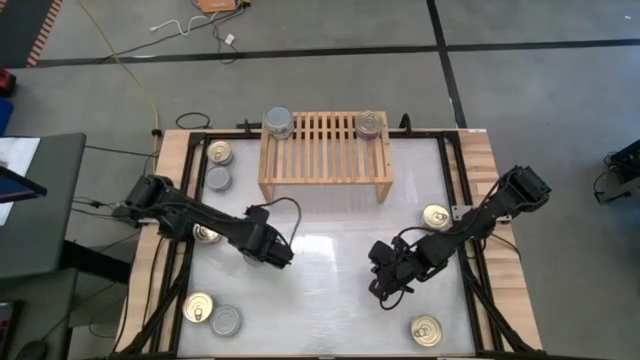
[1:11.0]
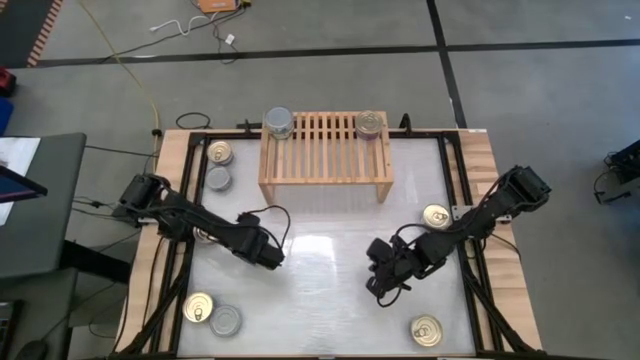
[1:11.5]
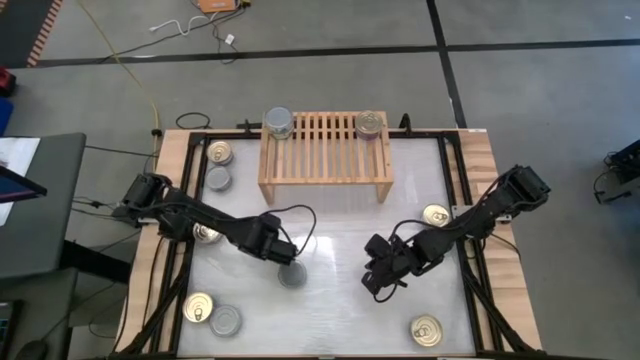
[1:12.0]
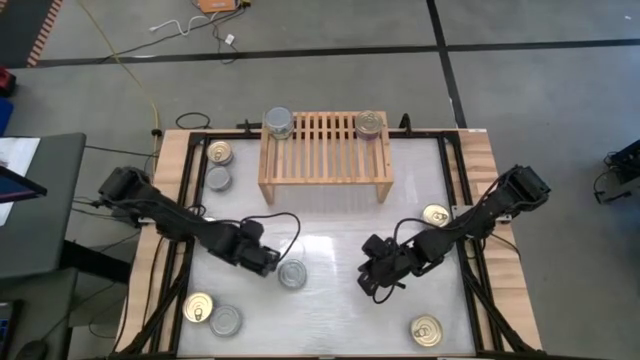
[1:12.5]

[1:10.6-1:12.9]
Task: Stack canned seafood by type on shelf
Move the green tuna can to the center of the table

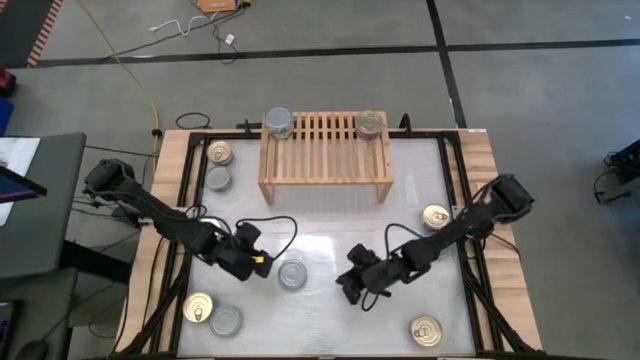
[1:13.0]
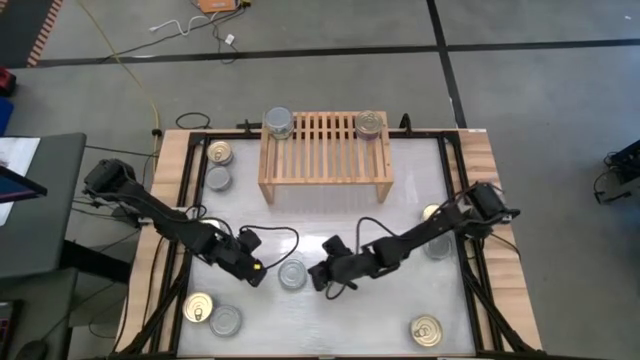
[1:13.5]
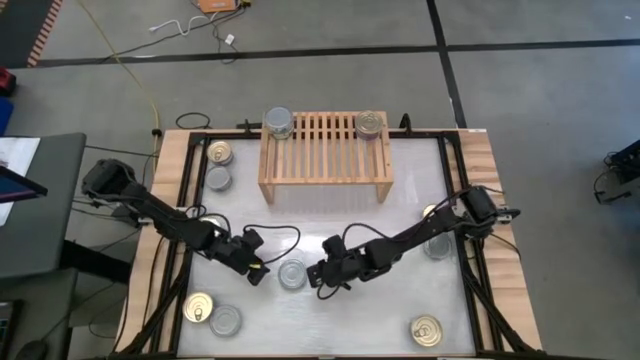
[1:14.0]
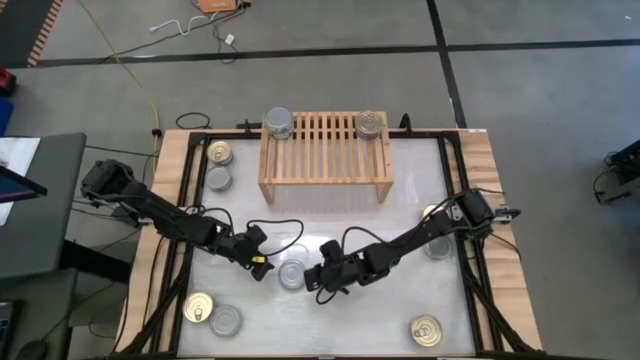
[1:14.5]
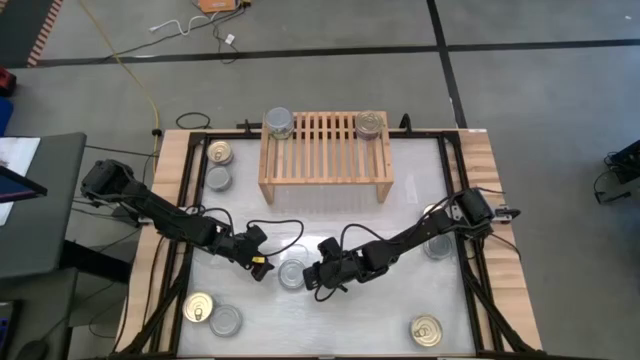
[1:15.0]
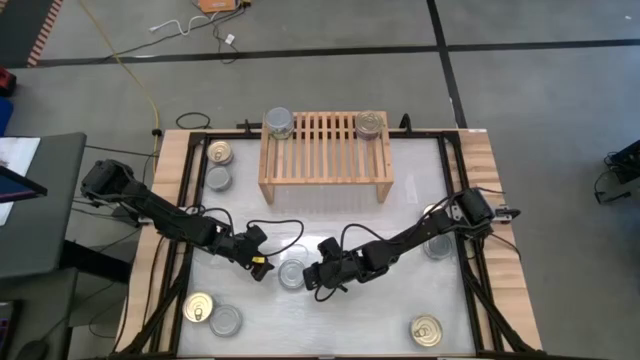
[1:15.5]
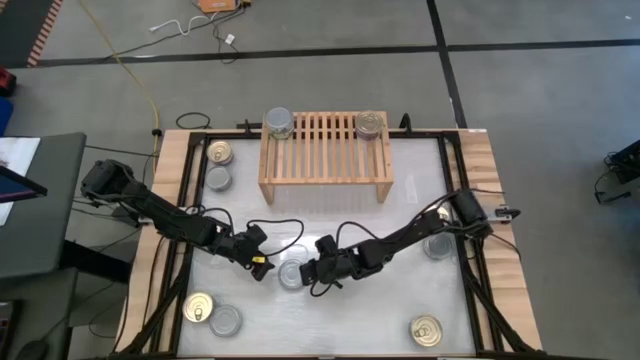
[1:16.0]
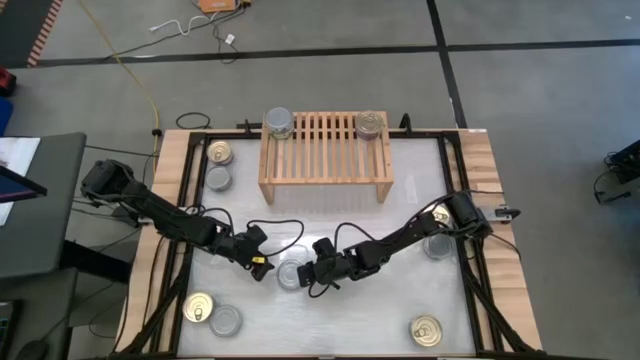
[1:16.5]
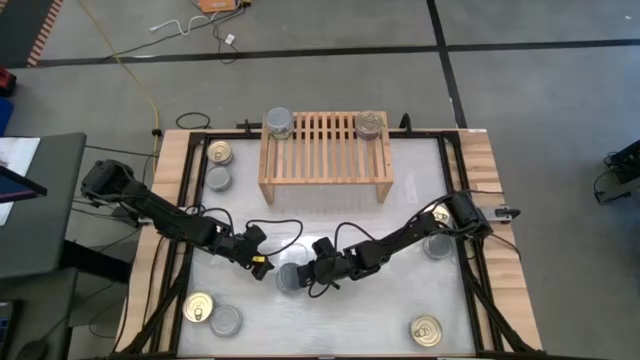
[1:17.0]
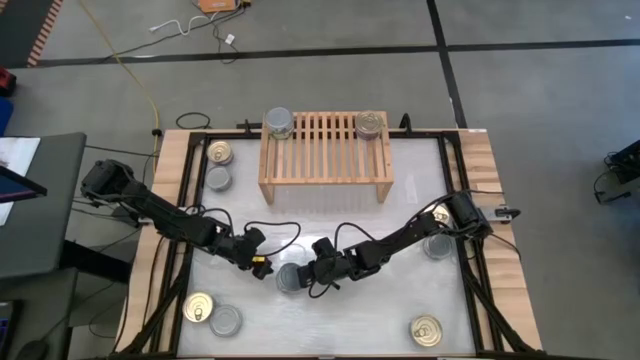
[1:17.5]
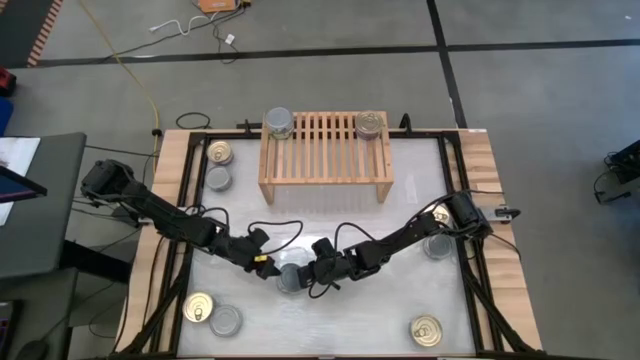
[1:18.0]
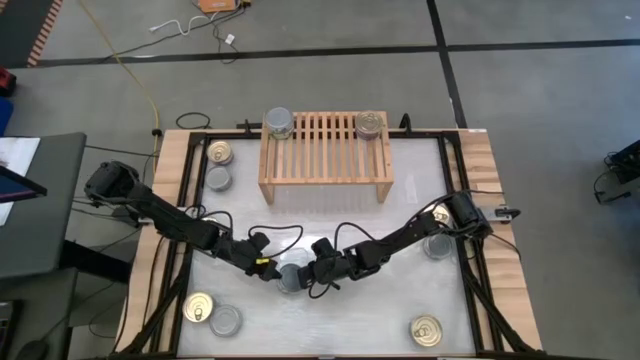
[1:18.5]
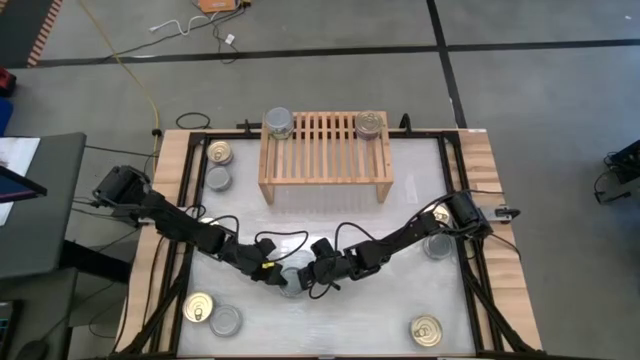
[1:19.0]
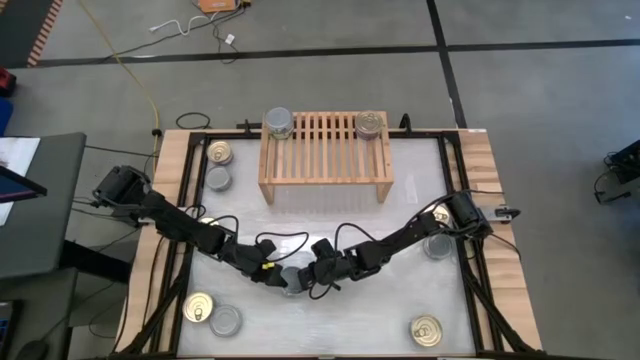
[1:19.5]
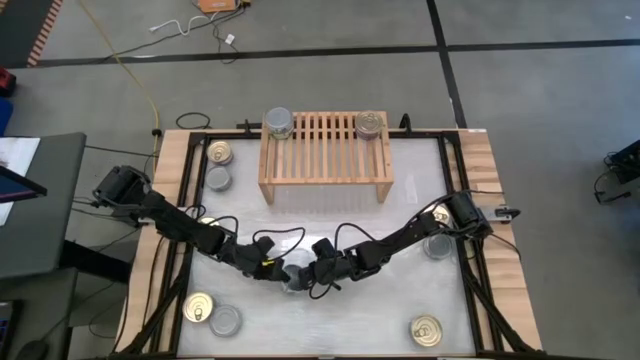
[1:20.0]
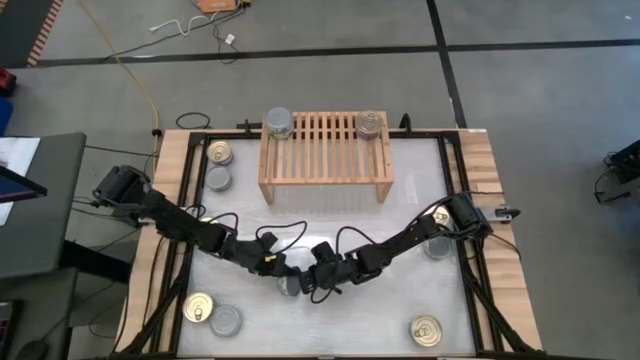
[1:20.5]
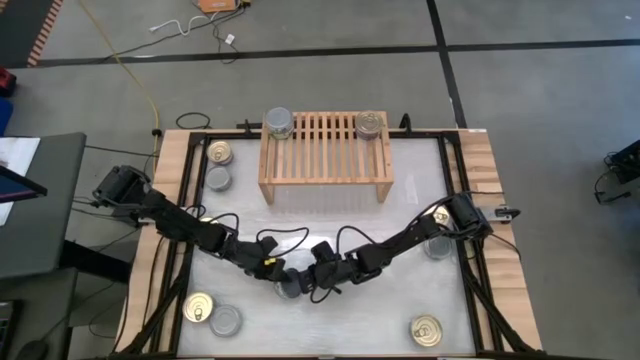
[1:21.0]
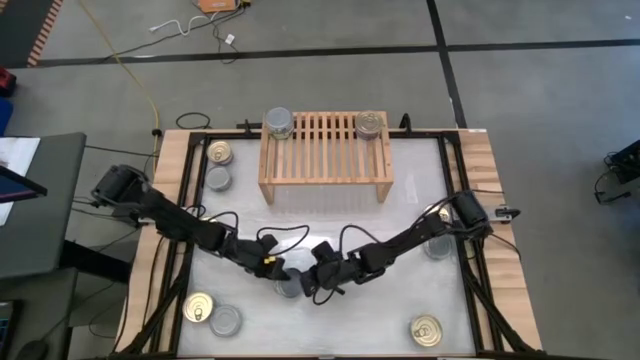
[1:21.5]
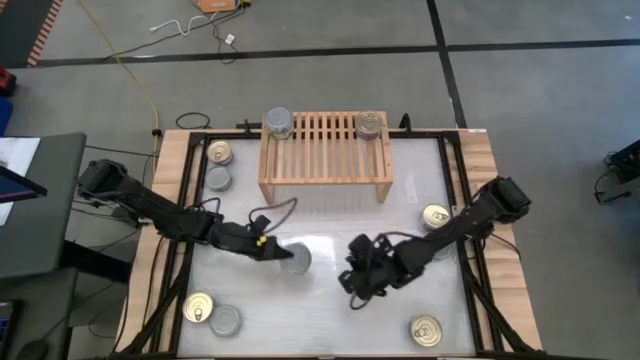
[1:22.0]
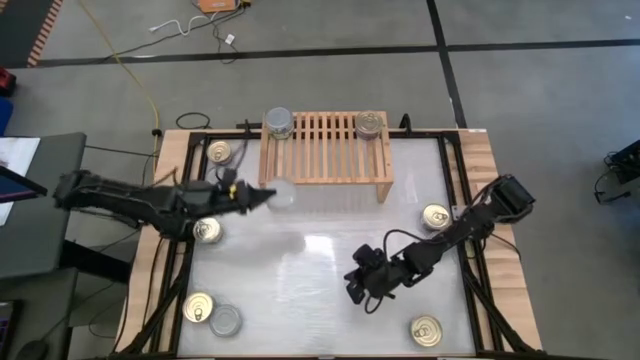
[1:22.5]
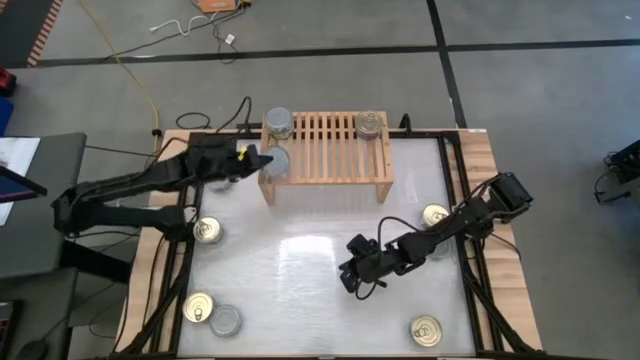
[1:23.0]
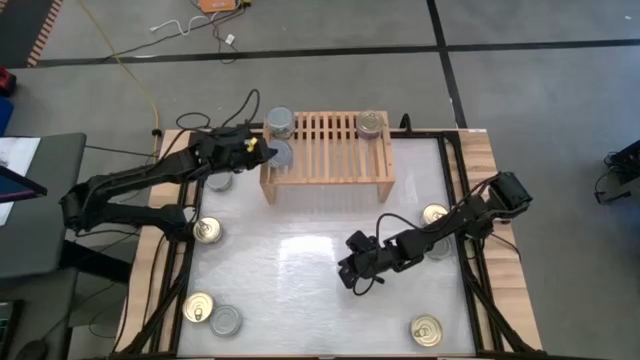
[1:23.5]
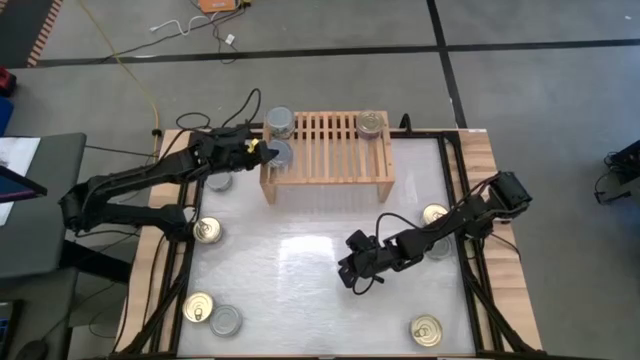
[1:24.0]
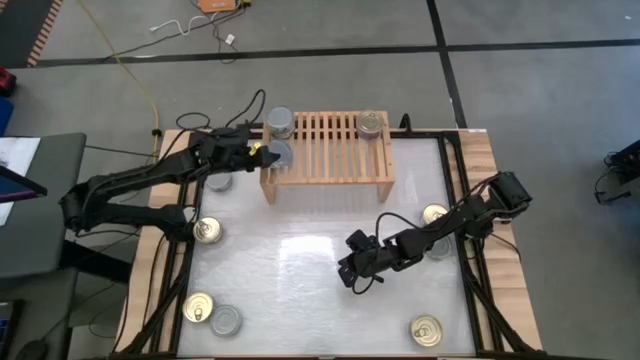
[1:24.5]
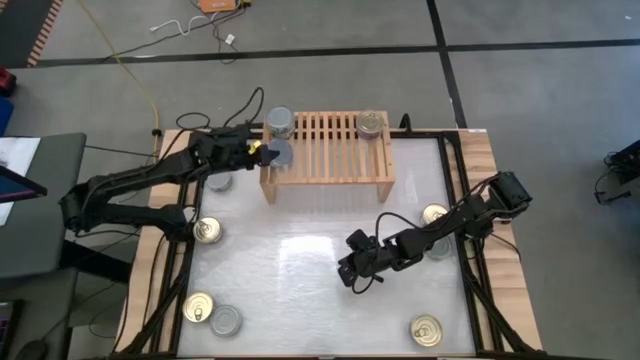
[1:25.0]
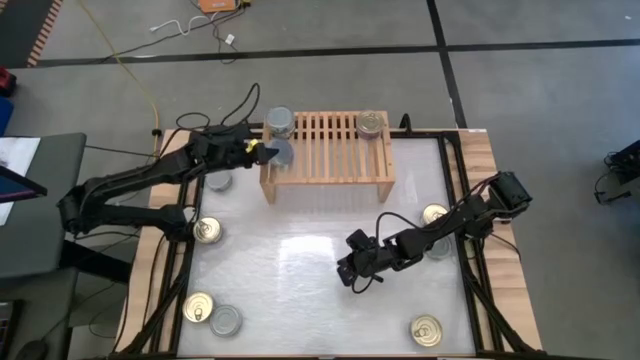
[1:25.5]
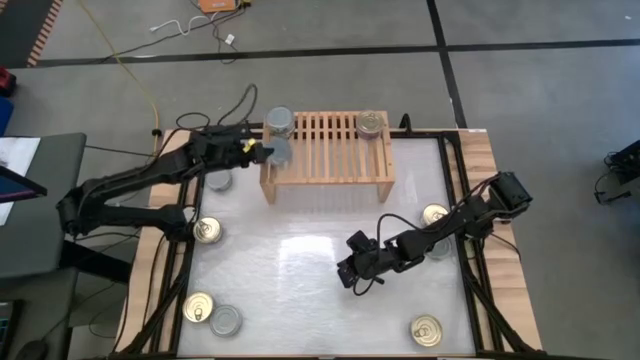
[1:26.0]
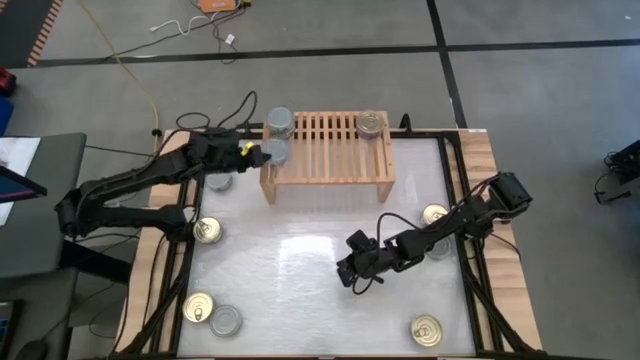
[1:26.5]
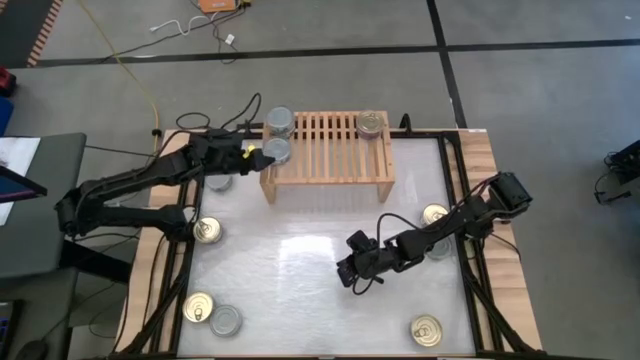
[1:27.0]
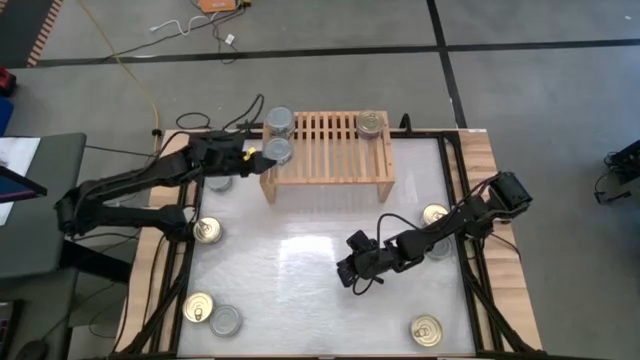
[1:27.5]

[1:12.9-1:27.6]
Put the green tuna can on the shelf

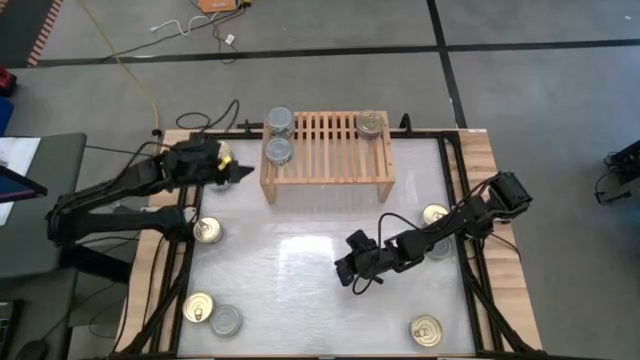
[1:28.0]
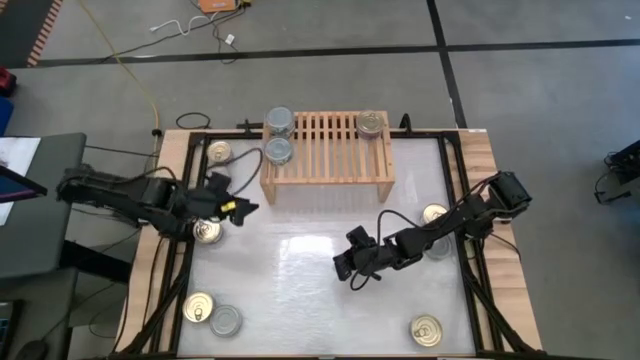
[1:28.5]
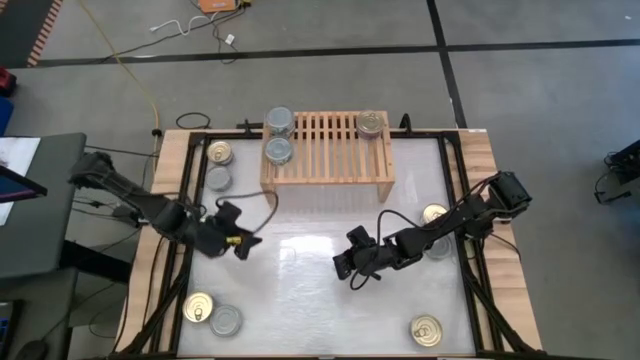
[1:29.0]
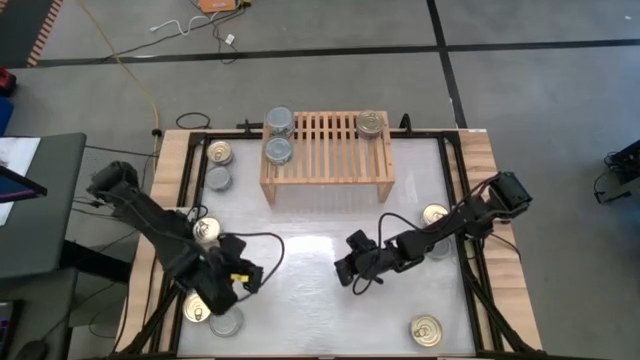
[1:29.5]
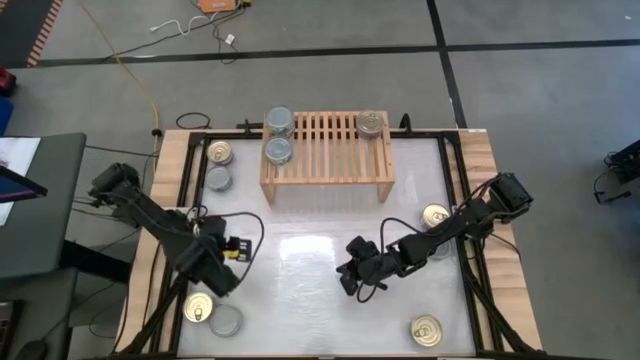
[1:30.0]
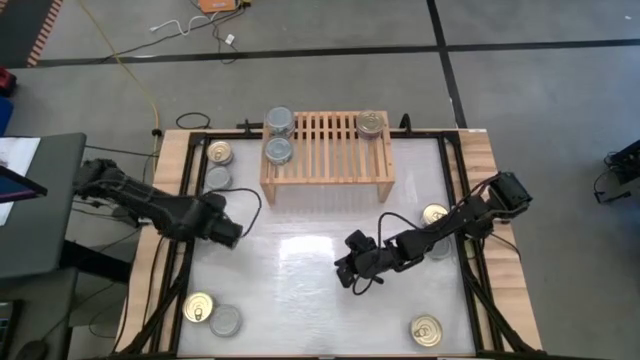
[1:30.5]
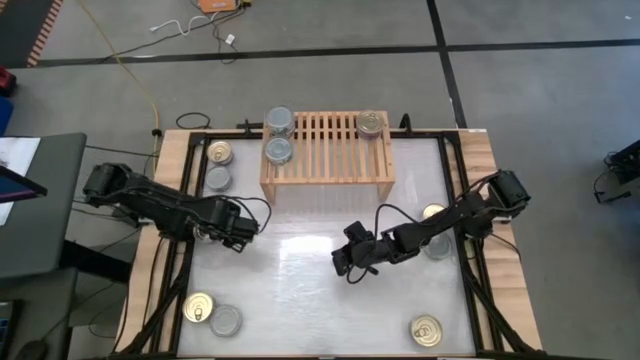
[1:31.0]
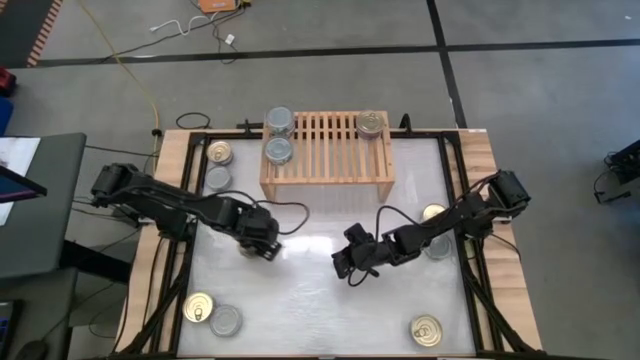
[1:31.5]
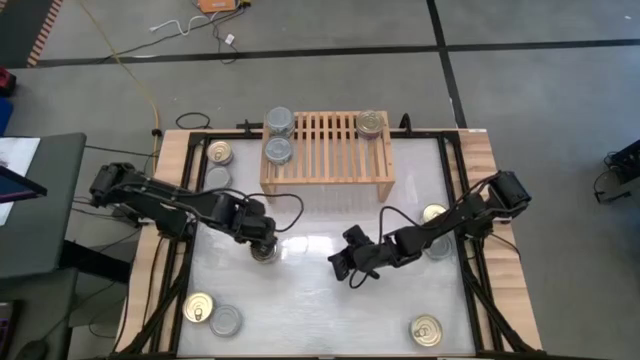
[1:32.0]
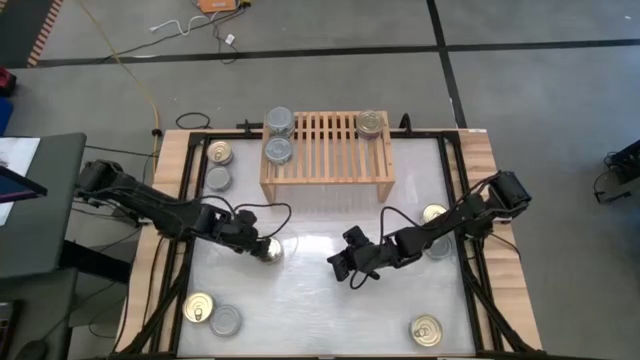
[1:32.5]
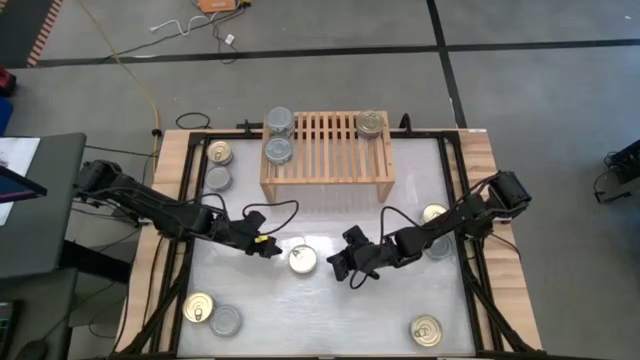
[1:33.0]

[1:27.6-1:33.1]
Move the blue tuna can to the center of the table
